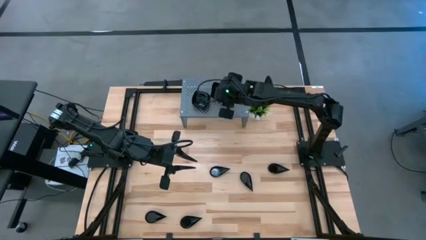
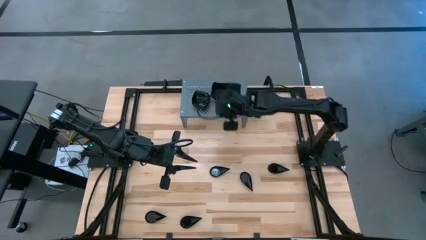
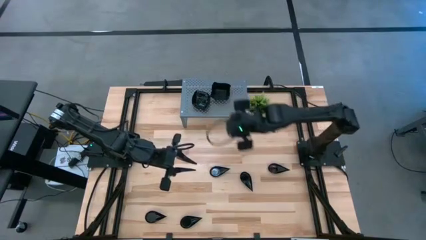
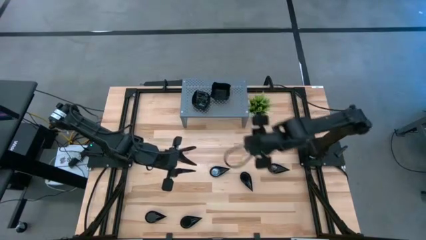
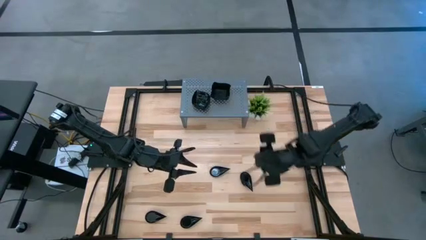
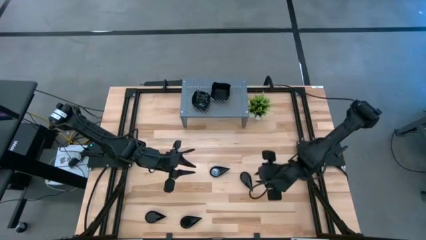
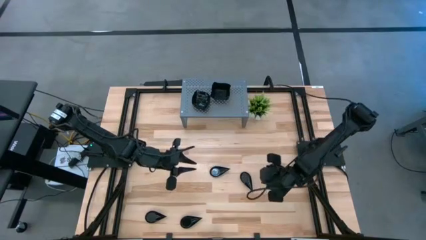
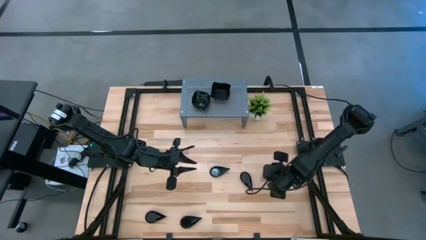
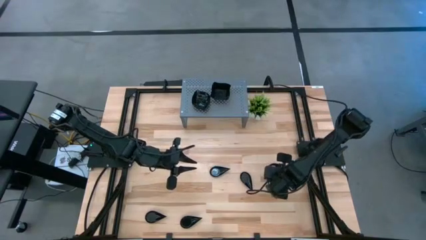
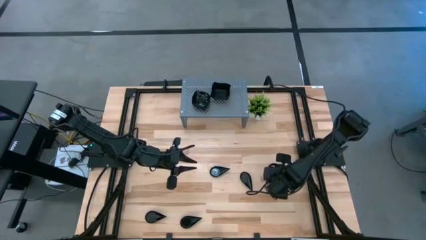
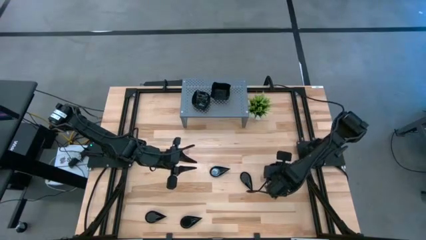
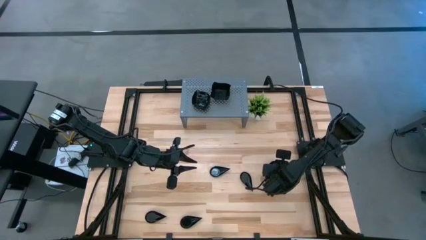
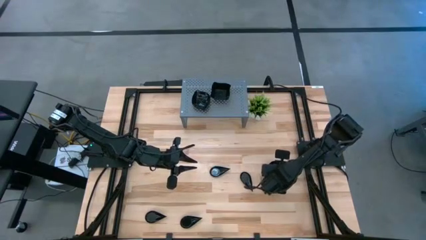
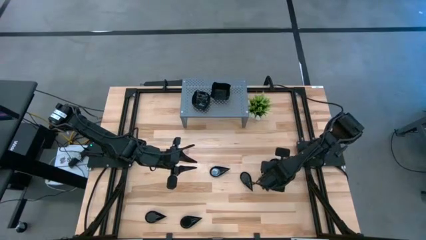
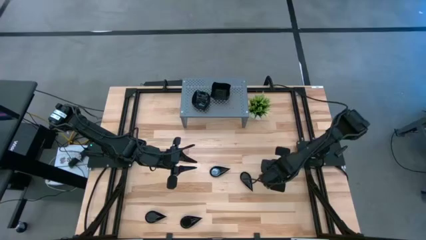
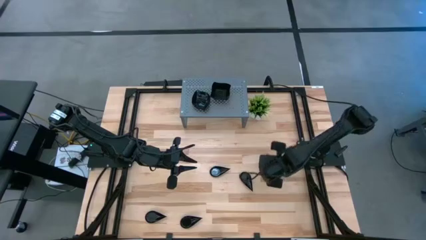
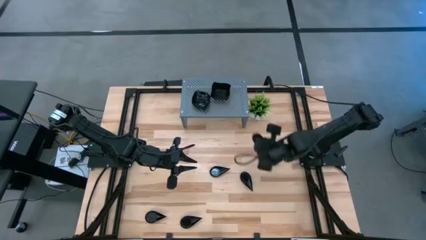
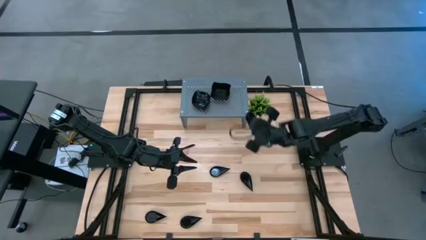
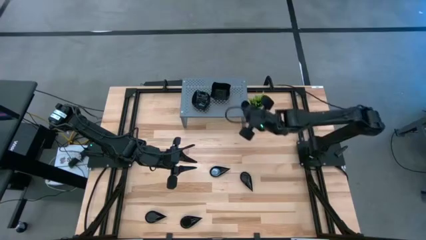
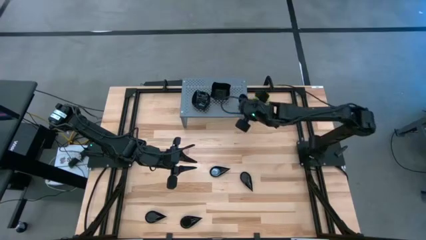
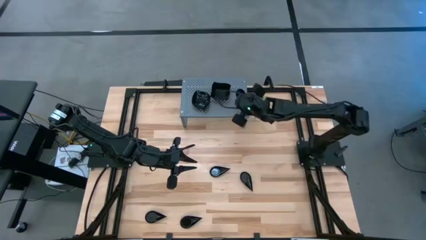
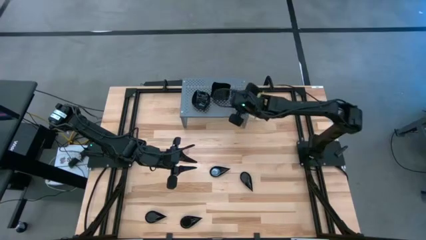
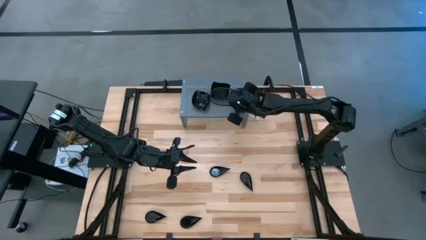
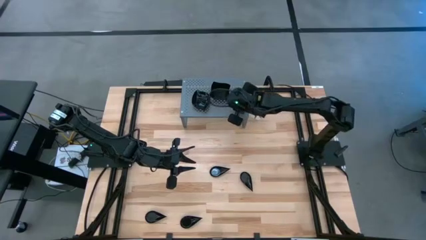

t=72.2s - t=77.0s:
Task: Pick & Place Mini shaped plates
Put the black drop-shaped plate on the shelf

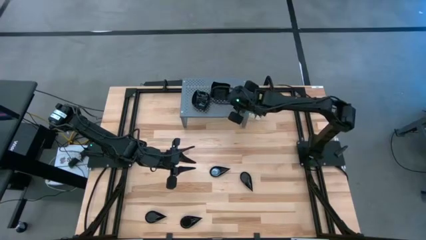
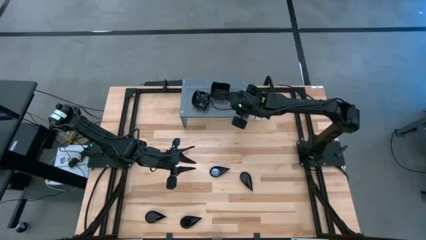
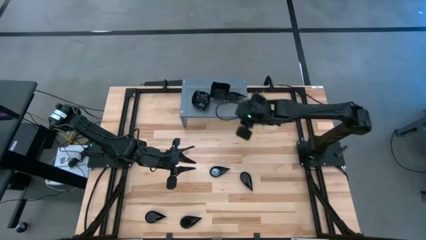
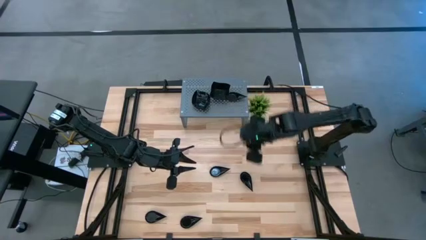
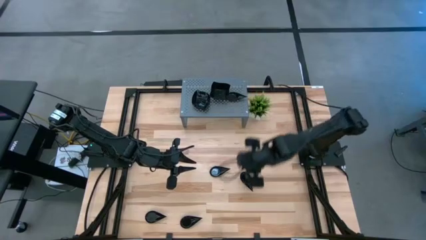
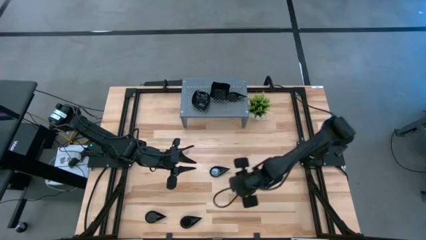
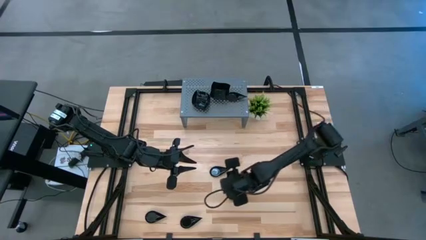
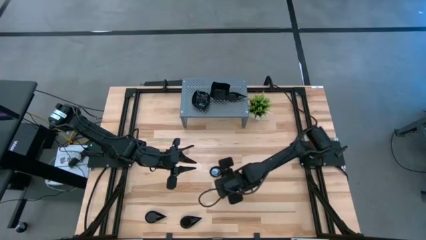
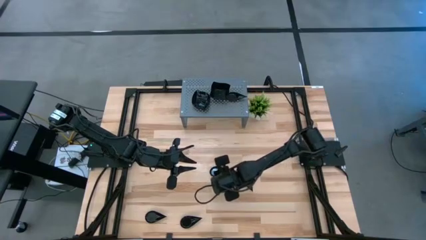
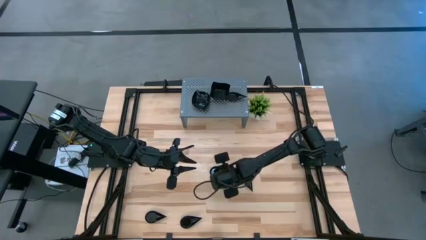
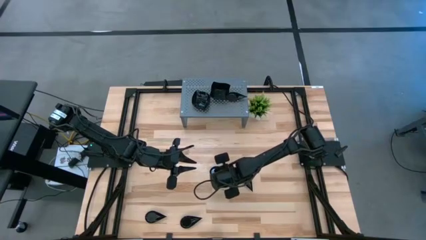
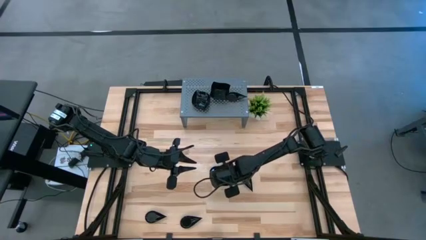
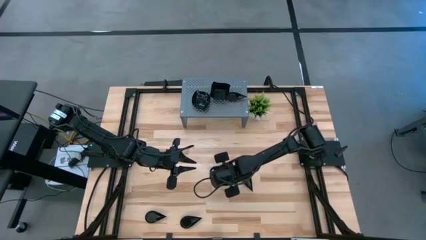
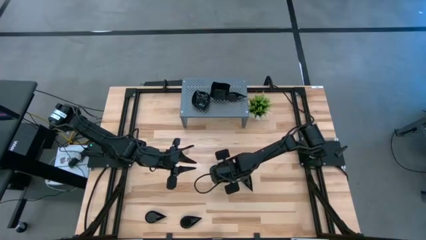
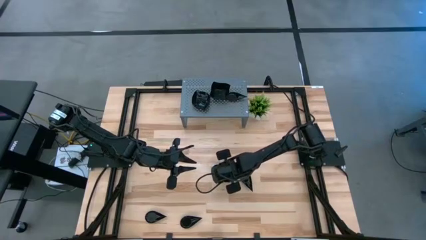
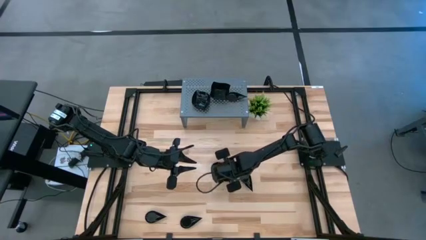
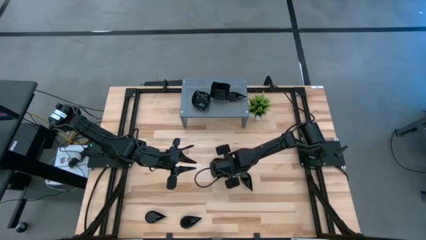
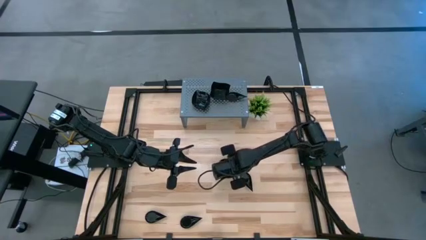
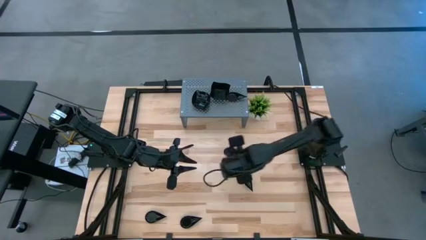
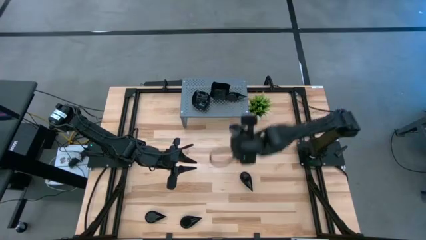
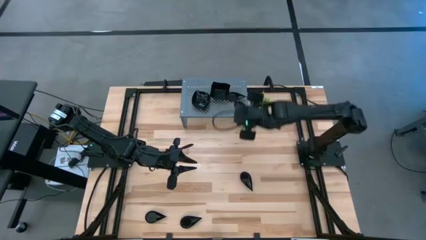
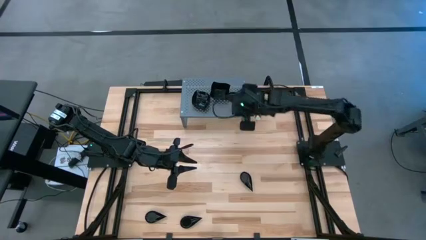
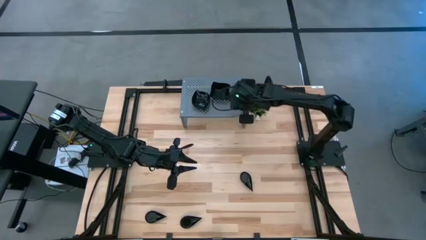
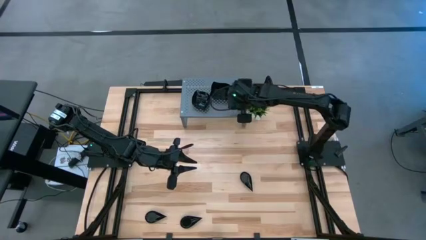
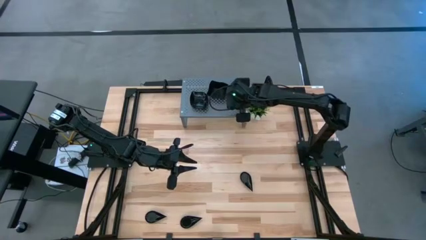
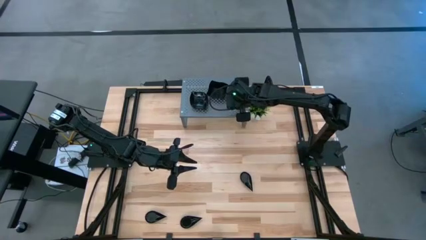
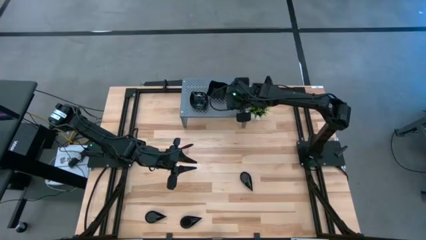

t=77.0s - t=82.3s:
Stack the black drop-shaped plate on top of the black drop-shaped plate on the shelf

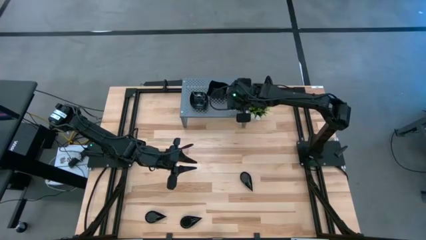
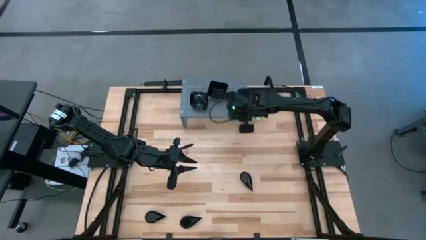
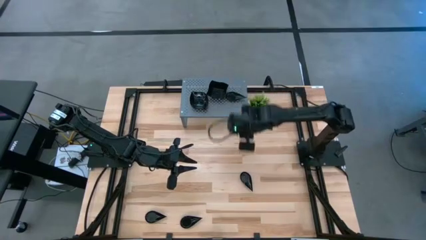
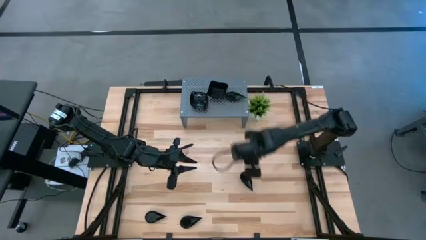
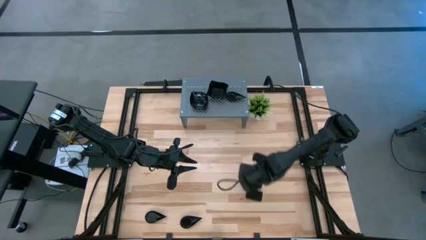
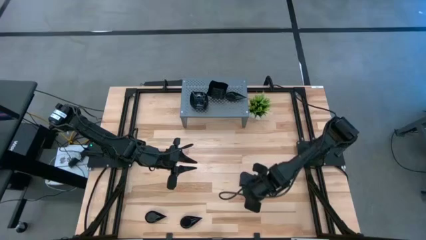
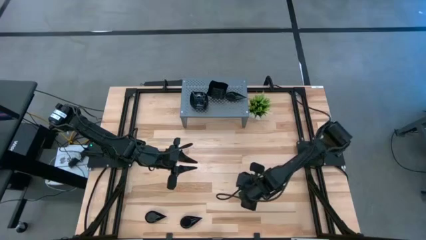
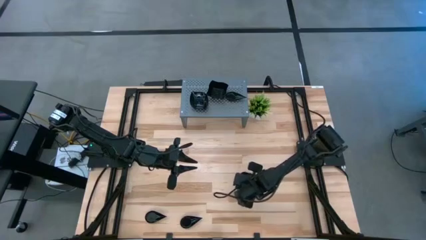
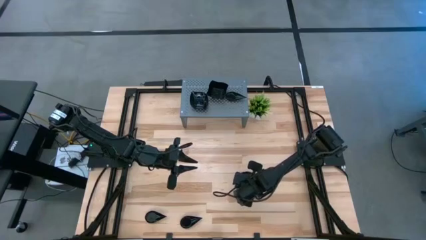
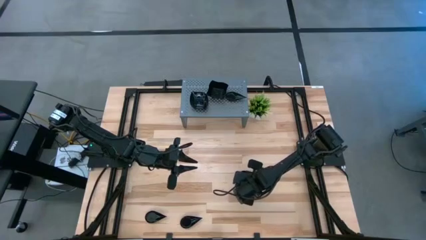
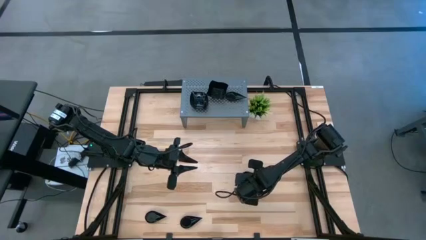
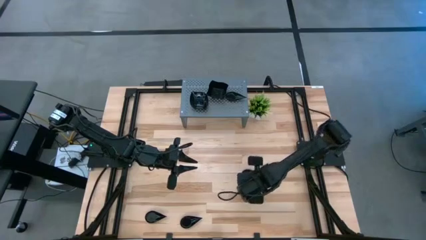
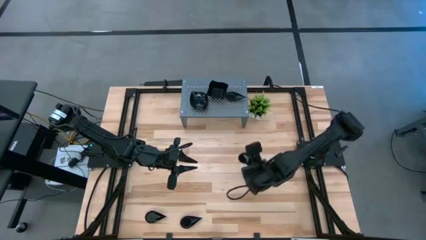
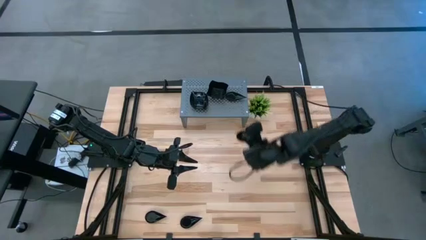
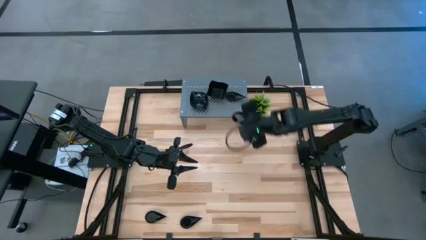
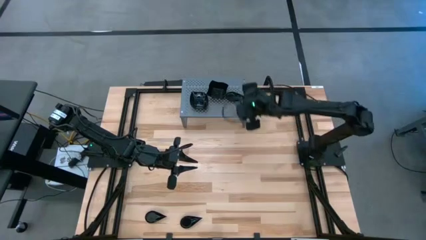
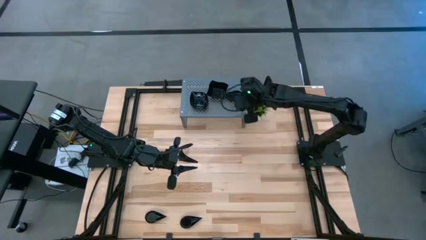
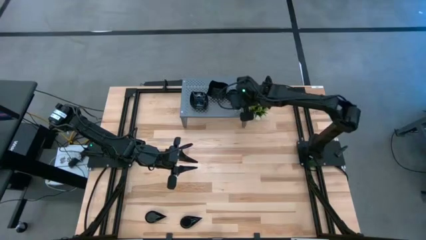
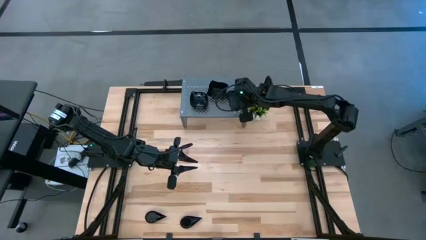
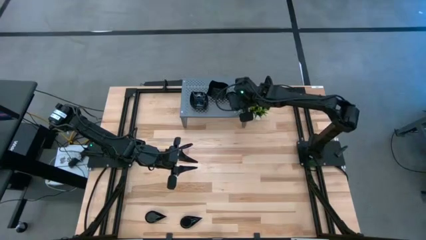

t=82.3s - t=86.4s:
Stack the black drop-shaped plate on top of the stacked black drop-shaped plates on the shelf

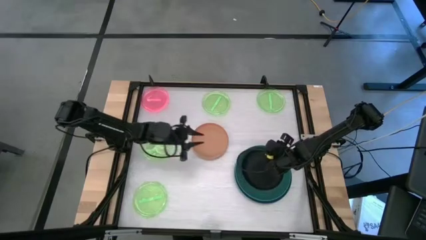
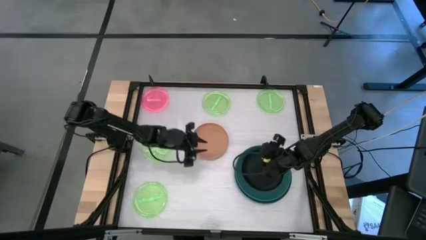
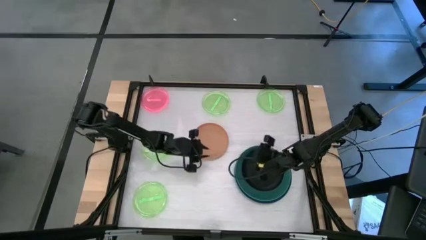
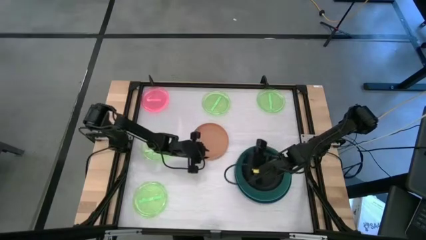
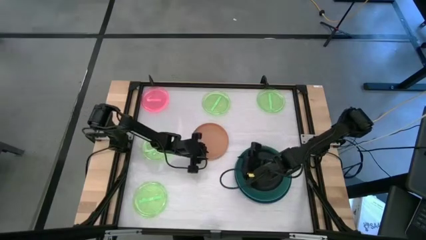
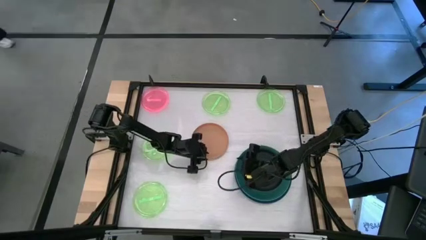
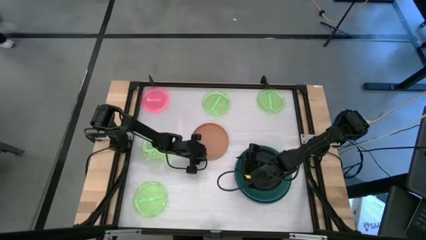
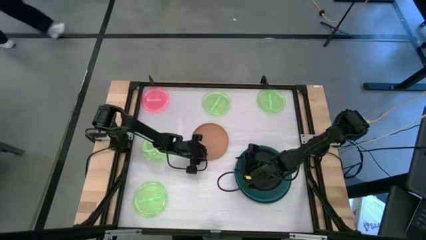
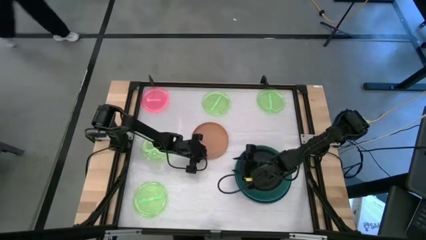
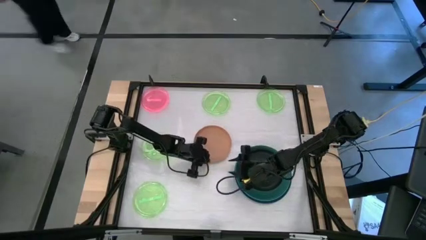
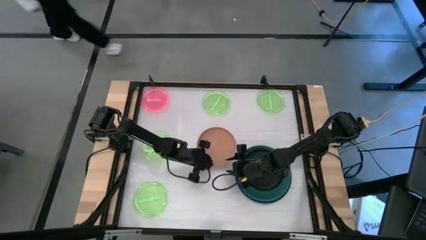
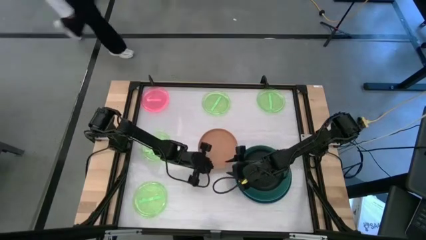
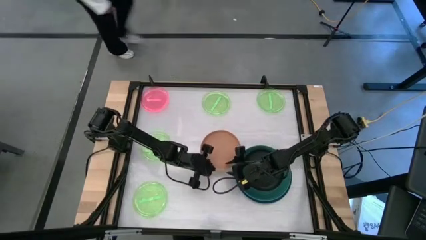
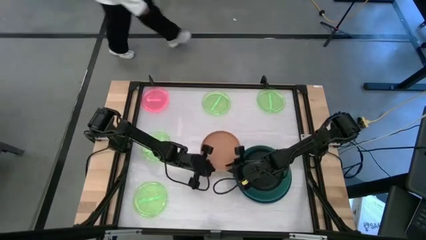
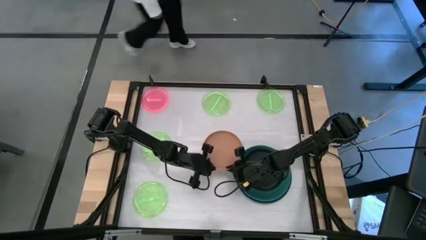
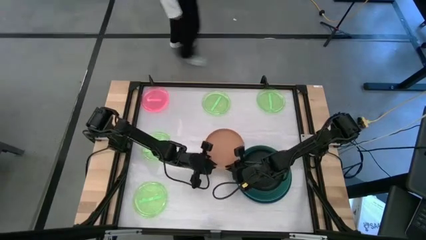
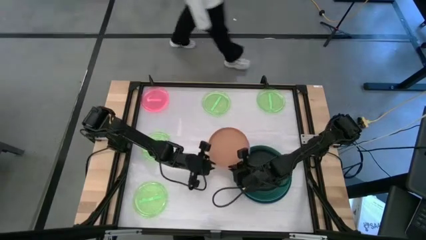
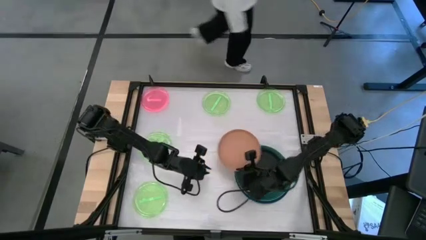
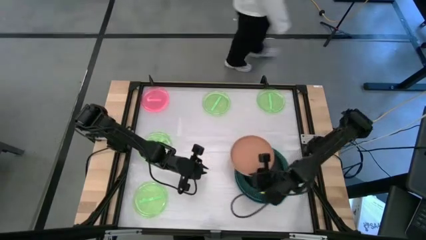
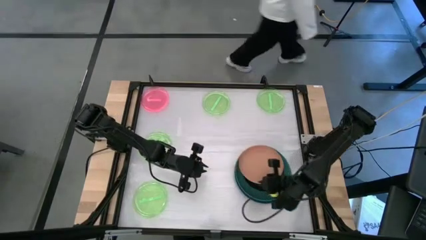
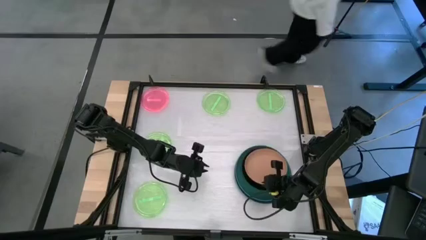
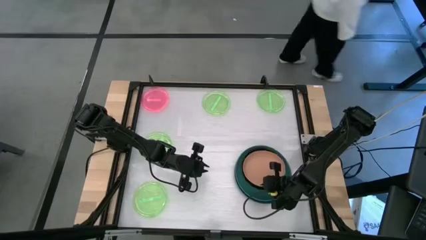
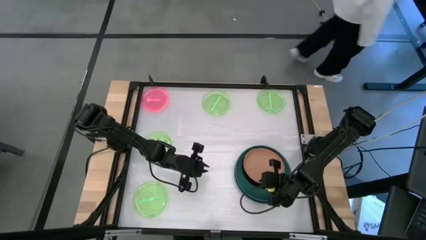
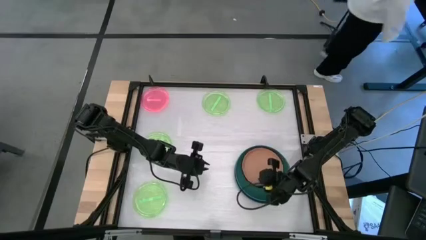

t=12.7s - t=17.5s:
Task: Stack plastic plates
Stack the orange plate on top of the black plate
